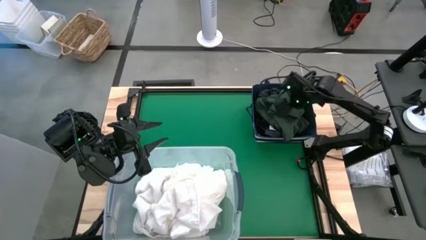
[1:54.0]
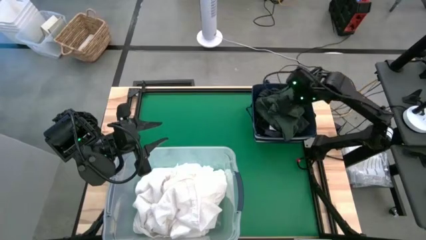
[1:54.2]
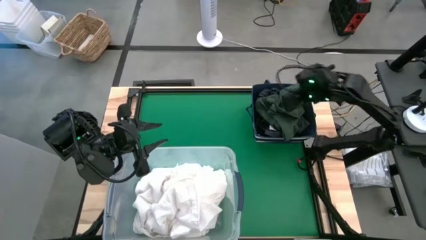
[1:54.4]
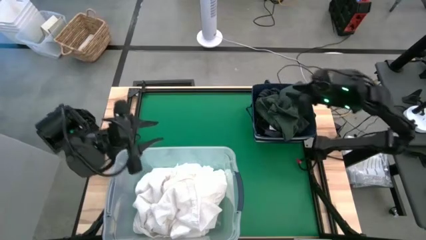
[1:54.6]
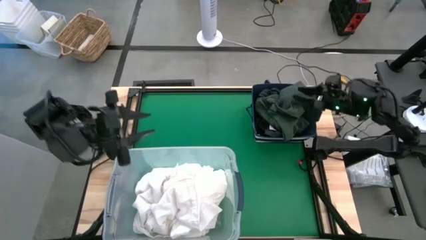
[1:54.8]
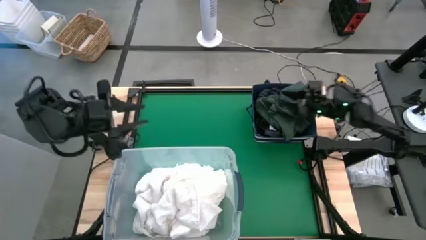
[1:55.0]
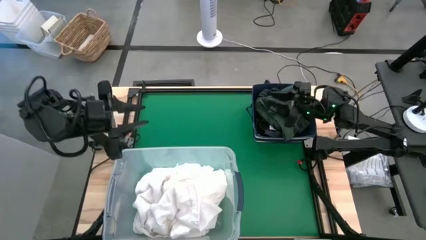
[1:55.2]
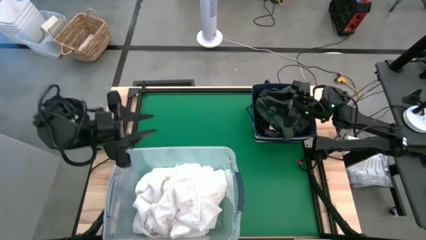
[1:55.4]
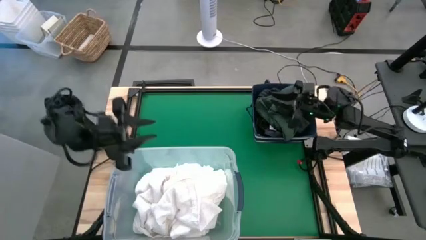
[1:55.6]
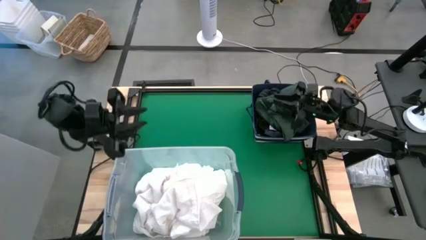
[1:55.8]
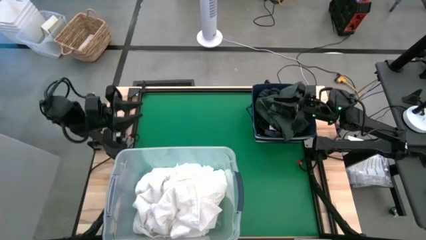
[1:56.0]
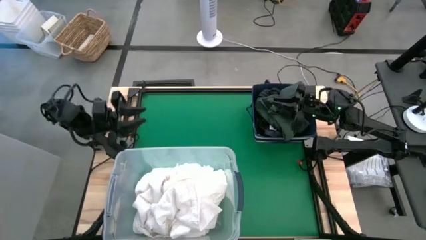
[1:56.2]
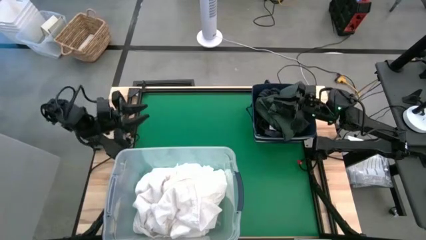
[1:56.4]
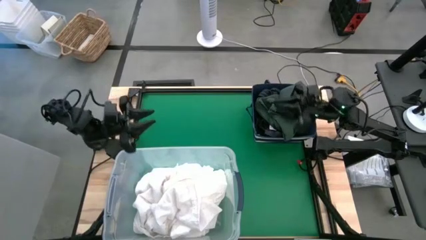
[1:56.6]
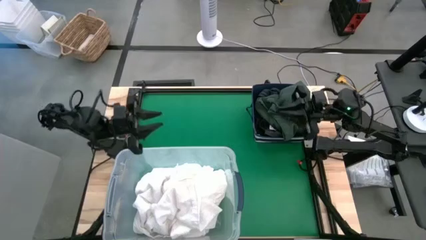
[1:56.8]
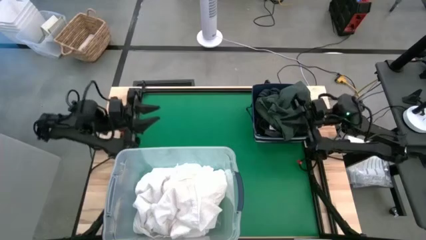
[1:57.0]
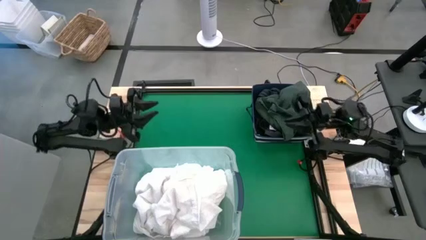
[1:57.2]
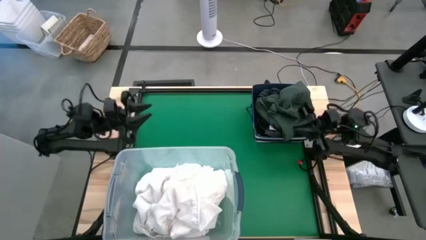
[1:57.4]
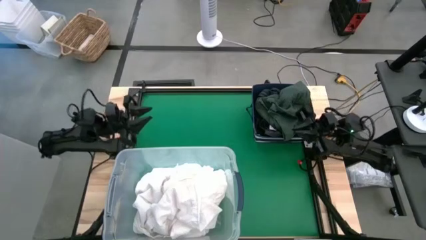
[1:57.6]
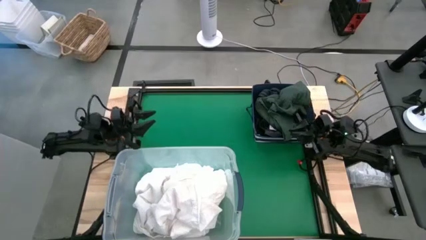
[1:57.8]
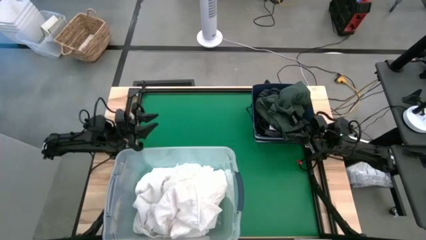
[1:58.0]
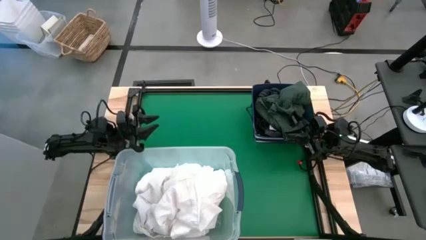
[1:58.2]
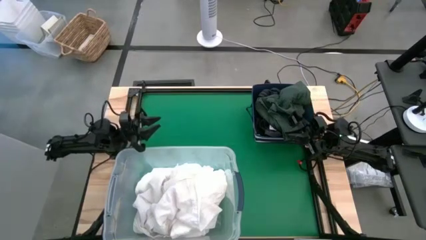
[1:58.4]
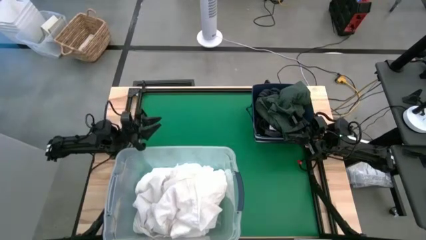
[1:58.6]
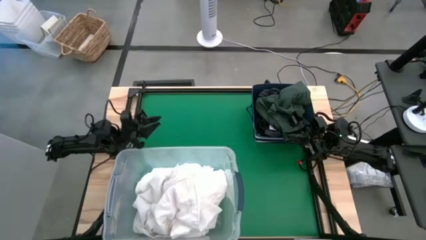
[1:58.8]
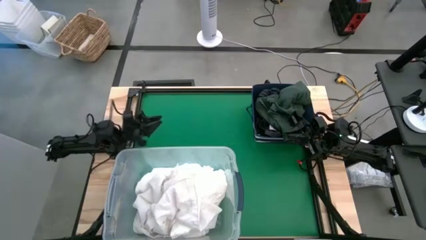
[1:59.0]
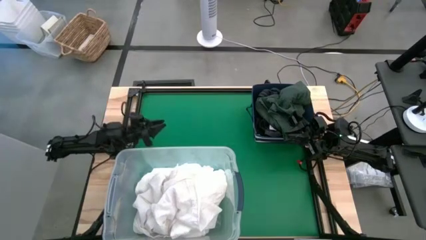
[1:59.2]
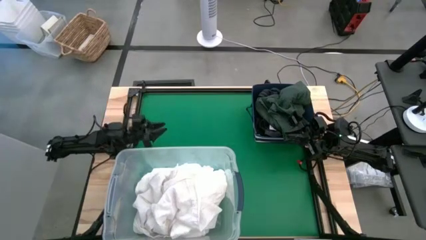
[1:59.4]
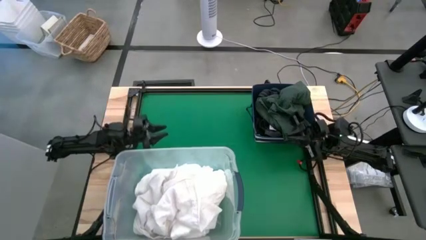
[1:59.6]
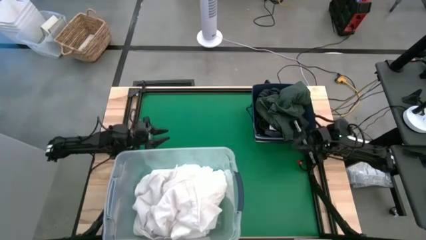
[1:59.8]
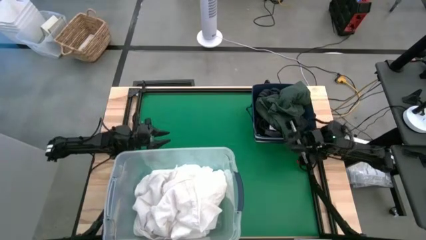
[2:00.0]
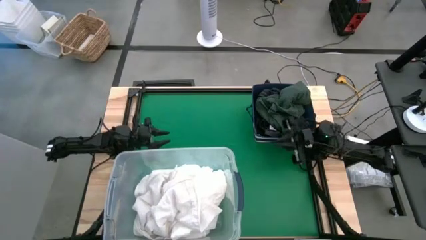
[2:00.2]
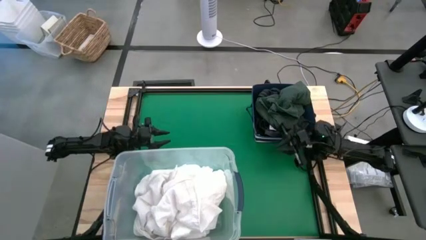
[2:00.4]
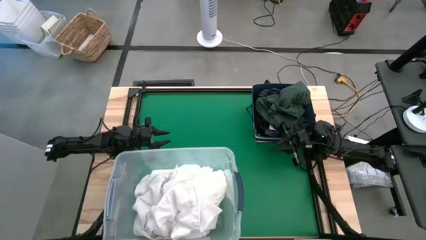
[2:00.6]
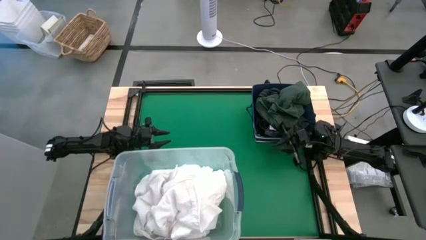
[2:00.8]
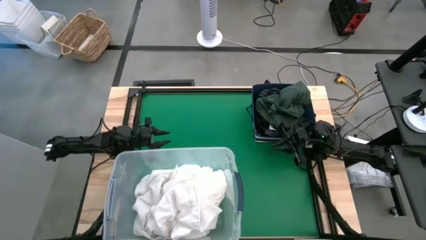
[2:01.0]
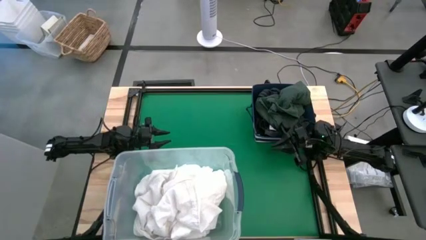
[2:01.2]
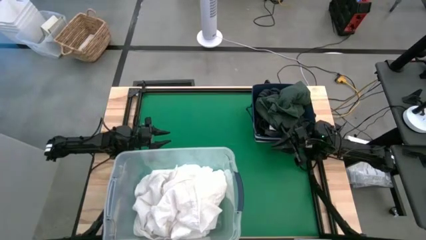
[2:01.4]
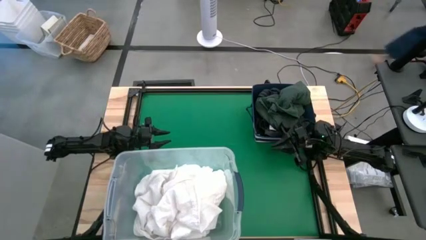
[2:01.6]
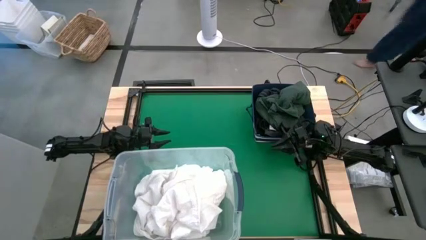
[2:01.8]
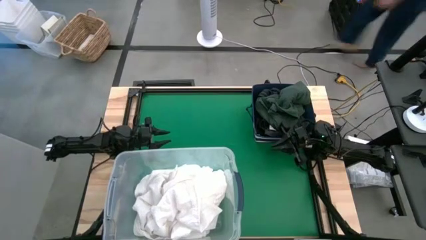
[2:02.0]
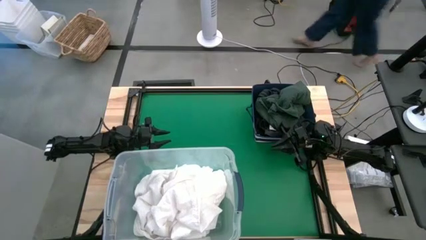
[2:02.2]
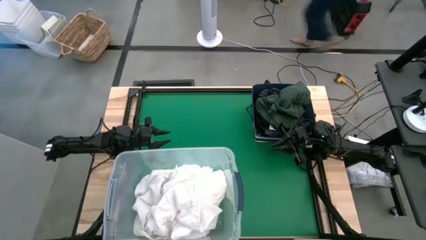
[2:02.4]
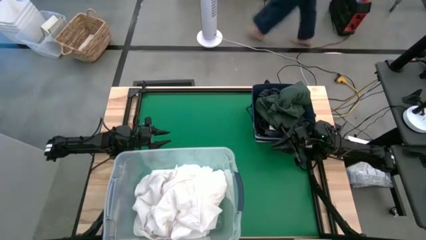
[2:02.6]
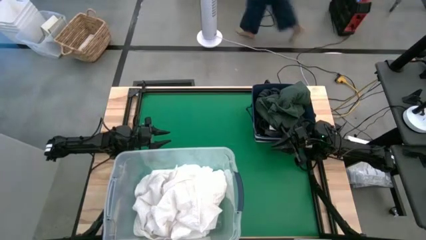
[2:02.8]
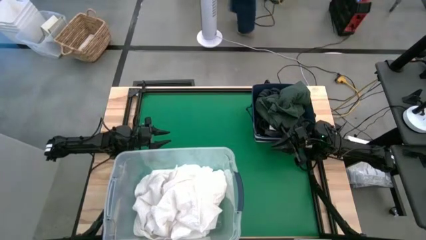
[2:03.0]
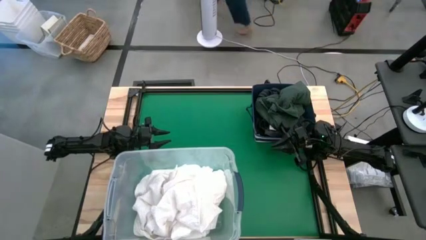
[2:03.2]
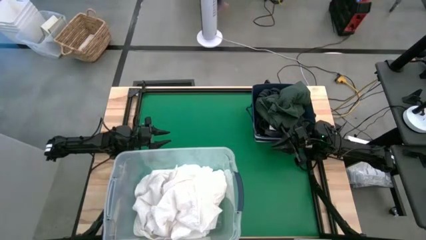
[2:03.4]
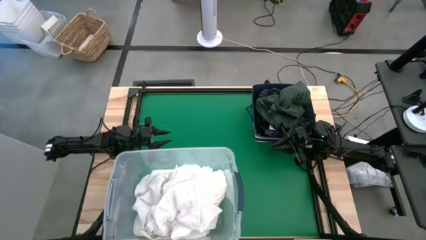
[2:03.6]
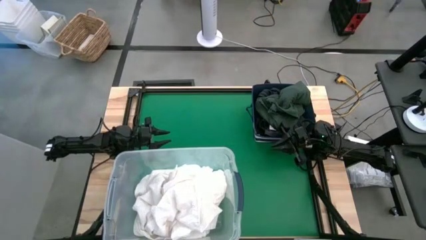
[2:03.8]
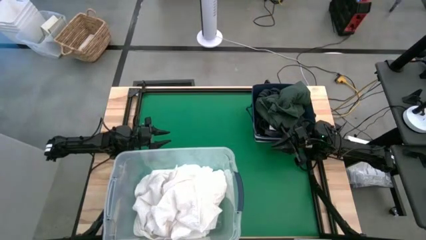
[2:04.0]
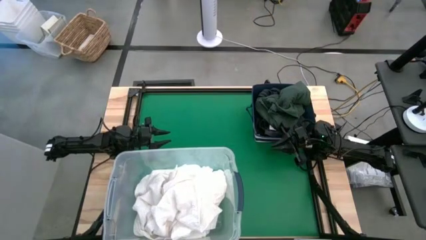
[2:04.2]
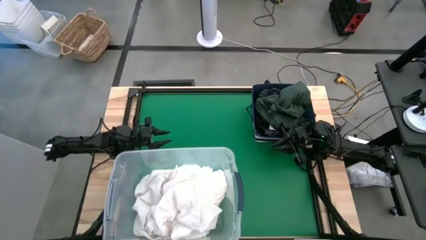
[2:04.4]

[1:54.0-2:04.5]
Return to Home Position
